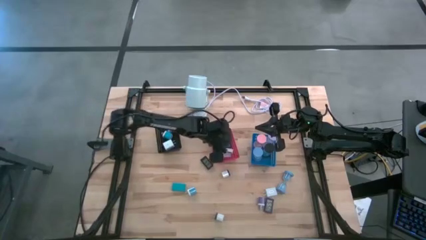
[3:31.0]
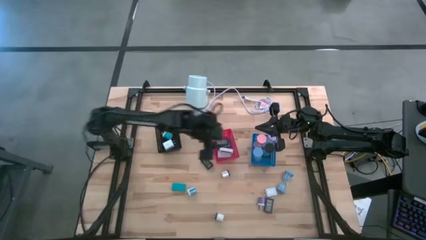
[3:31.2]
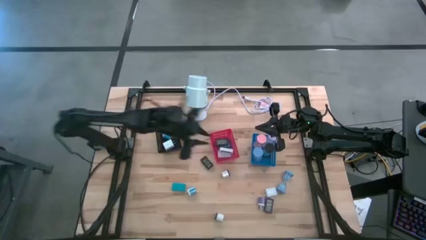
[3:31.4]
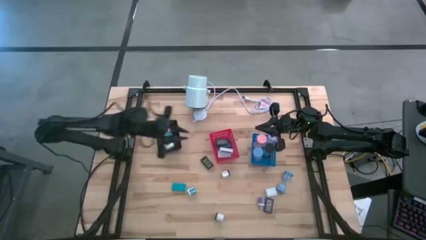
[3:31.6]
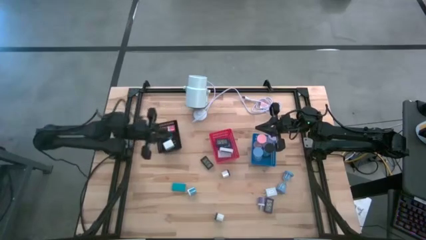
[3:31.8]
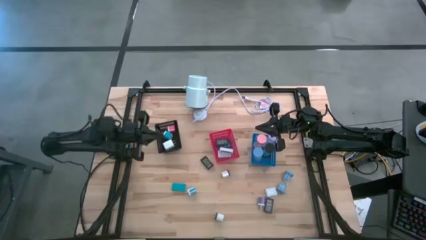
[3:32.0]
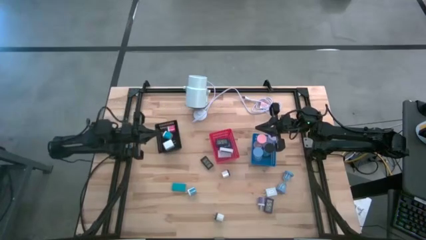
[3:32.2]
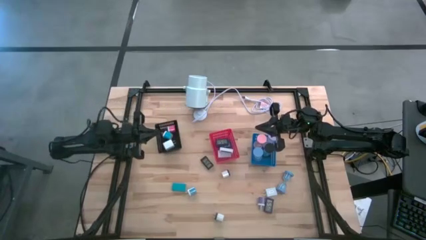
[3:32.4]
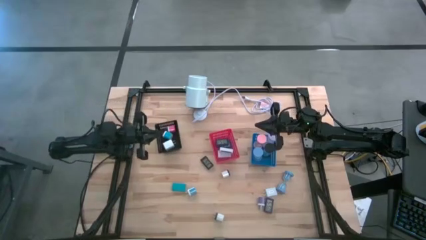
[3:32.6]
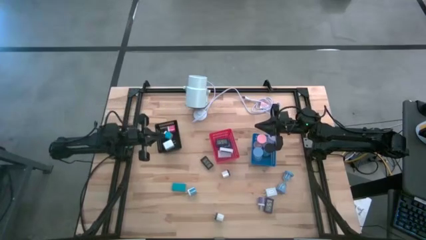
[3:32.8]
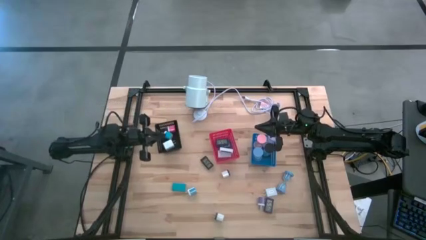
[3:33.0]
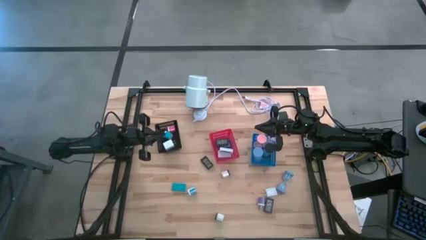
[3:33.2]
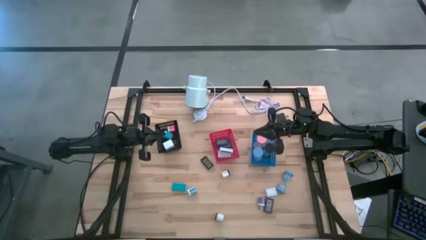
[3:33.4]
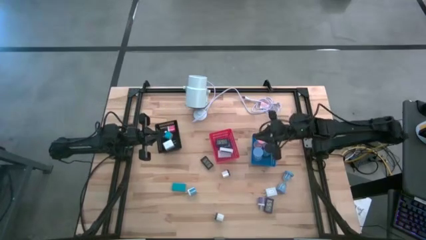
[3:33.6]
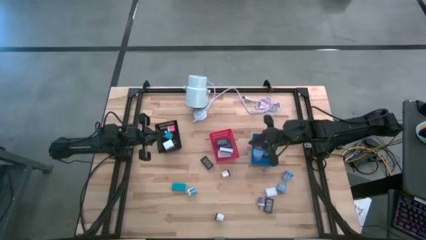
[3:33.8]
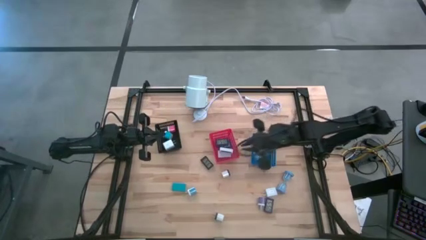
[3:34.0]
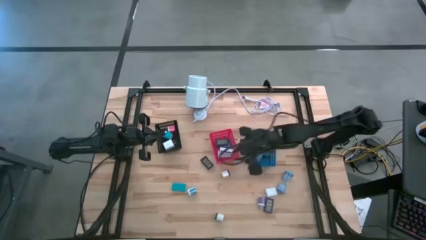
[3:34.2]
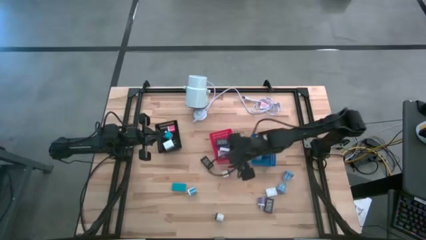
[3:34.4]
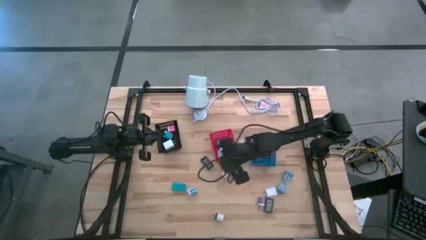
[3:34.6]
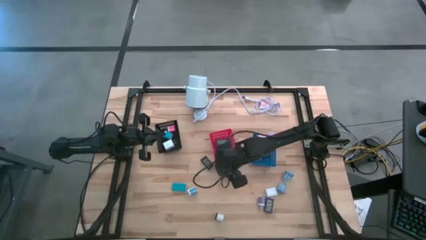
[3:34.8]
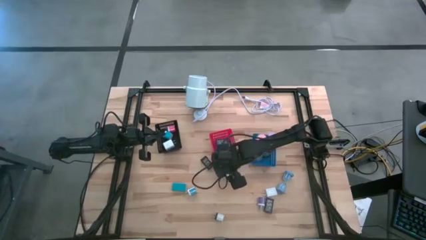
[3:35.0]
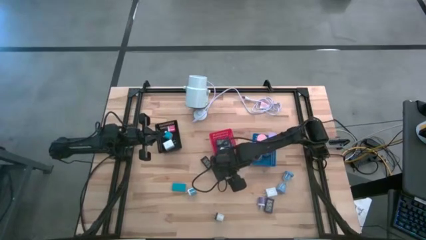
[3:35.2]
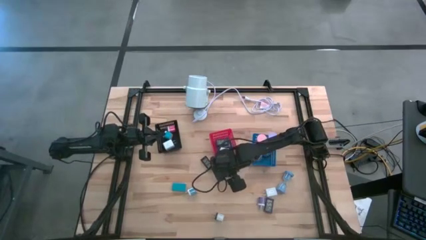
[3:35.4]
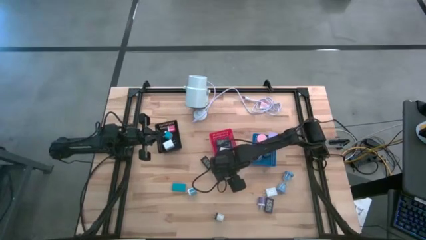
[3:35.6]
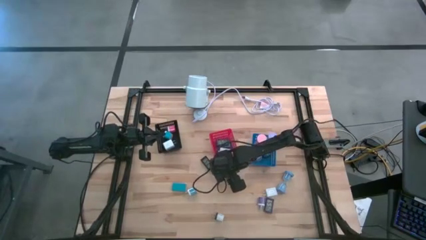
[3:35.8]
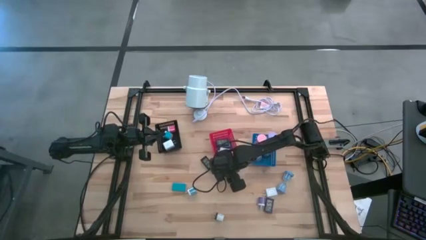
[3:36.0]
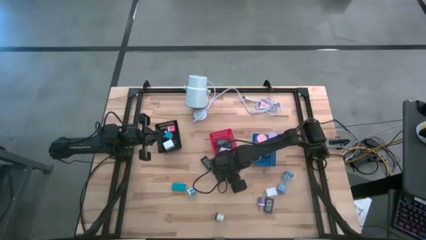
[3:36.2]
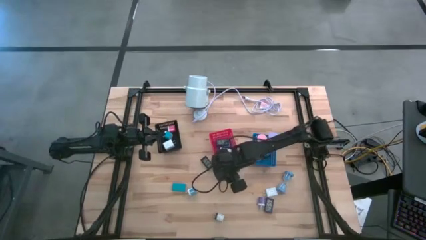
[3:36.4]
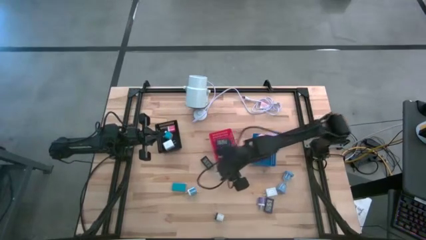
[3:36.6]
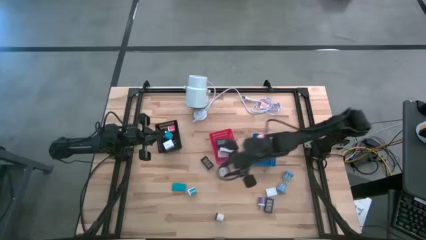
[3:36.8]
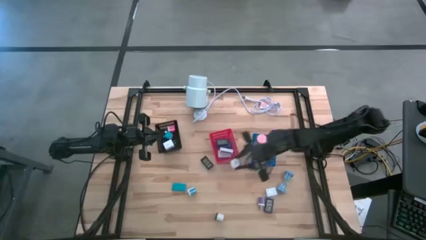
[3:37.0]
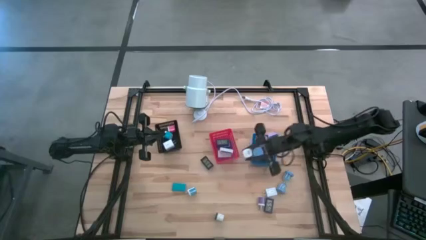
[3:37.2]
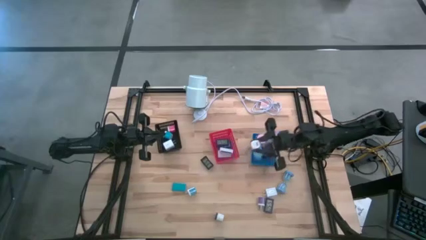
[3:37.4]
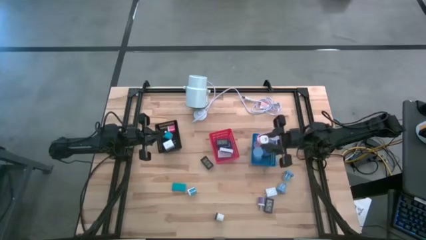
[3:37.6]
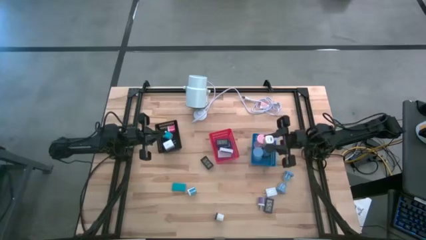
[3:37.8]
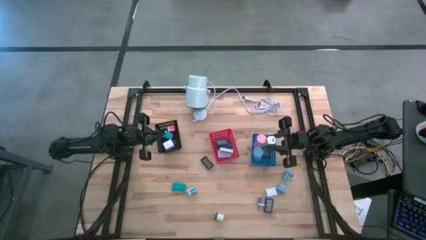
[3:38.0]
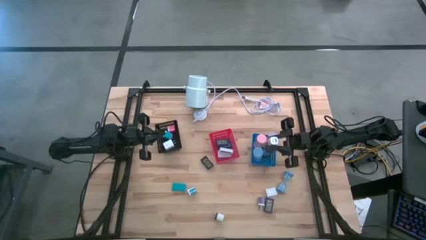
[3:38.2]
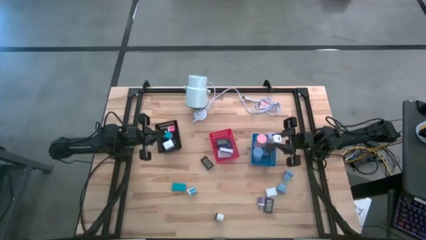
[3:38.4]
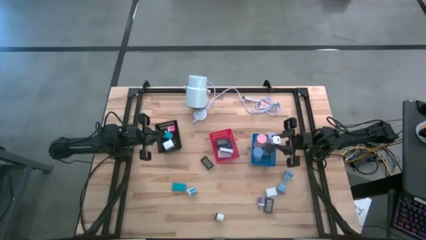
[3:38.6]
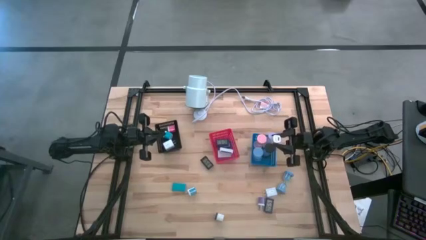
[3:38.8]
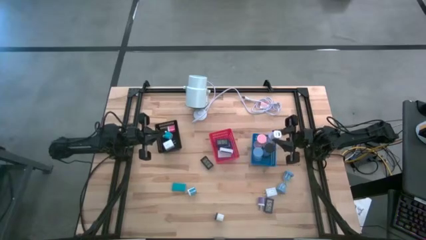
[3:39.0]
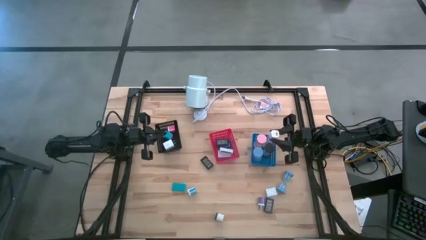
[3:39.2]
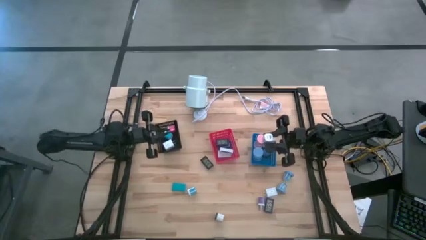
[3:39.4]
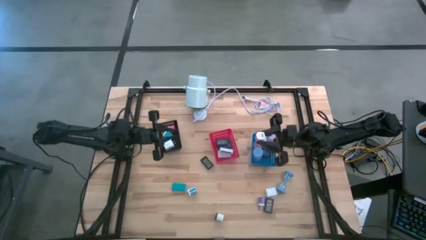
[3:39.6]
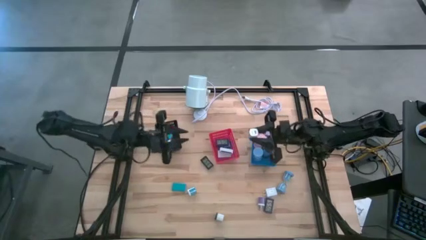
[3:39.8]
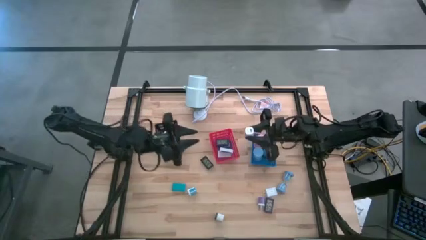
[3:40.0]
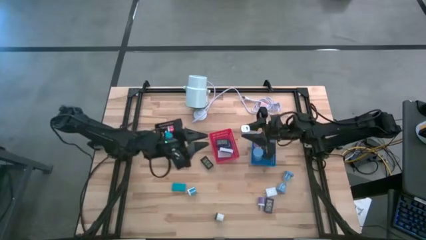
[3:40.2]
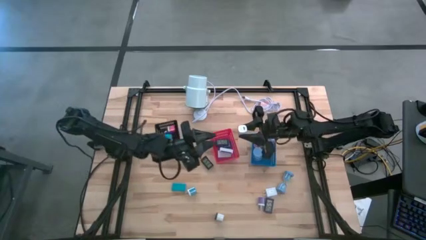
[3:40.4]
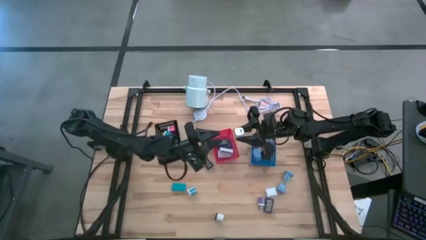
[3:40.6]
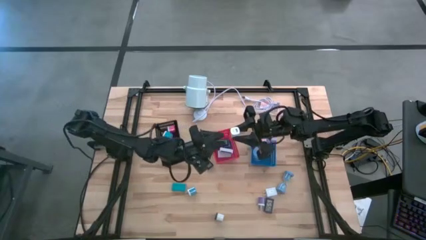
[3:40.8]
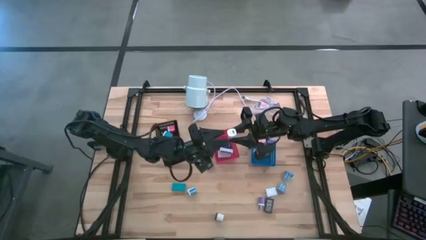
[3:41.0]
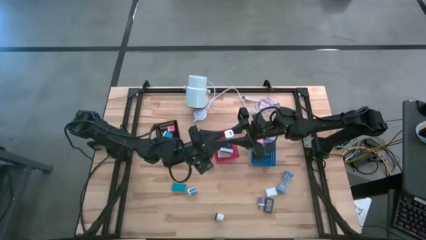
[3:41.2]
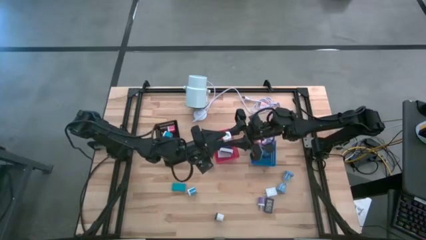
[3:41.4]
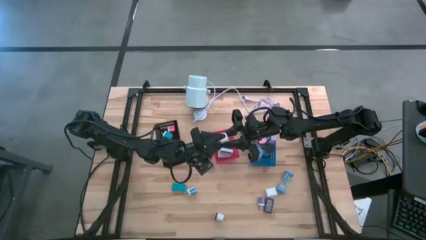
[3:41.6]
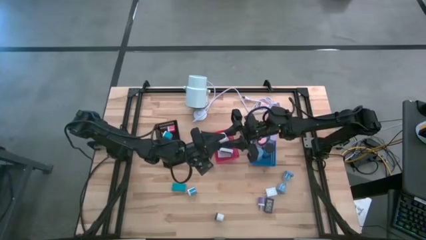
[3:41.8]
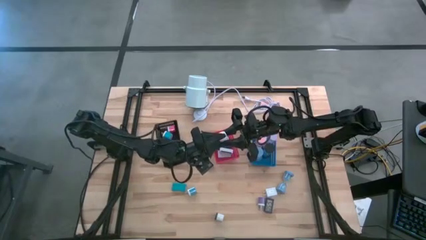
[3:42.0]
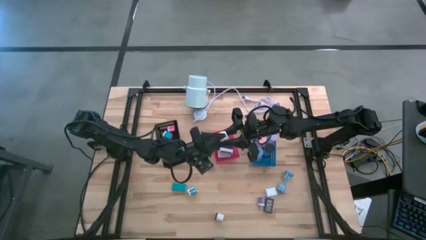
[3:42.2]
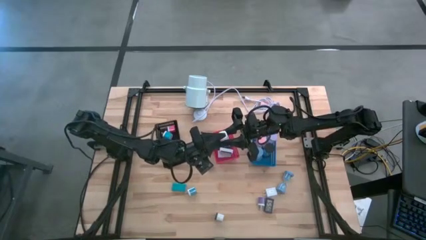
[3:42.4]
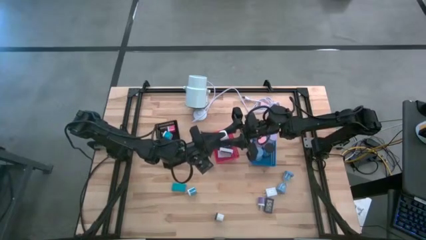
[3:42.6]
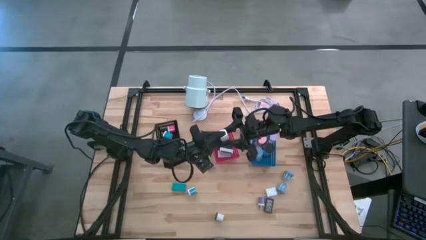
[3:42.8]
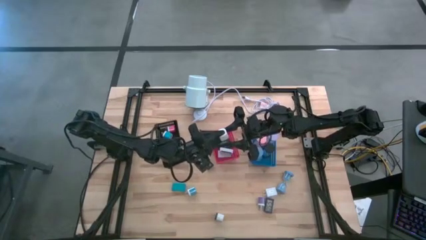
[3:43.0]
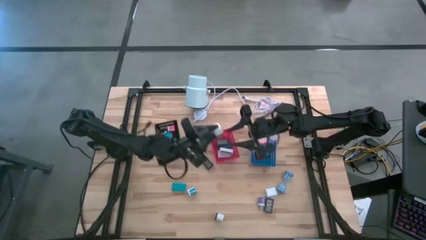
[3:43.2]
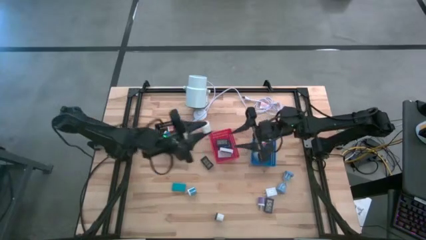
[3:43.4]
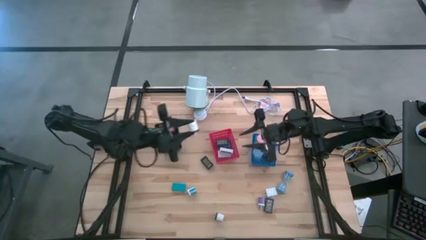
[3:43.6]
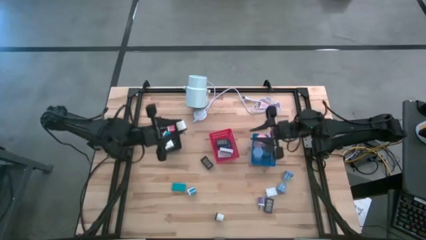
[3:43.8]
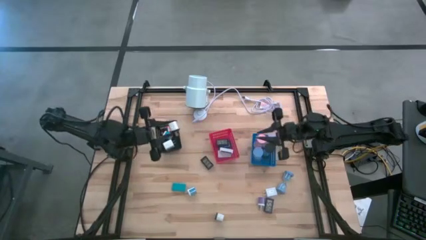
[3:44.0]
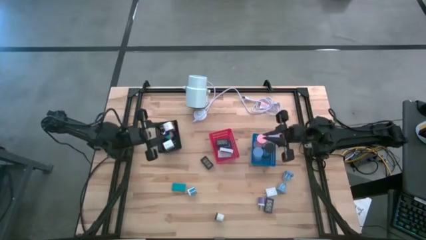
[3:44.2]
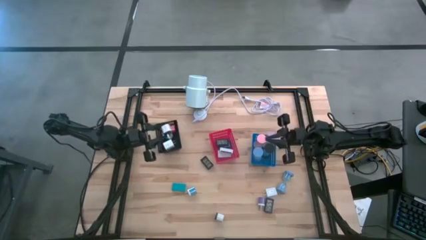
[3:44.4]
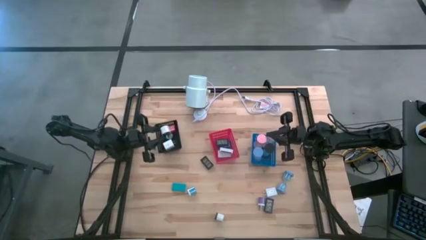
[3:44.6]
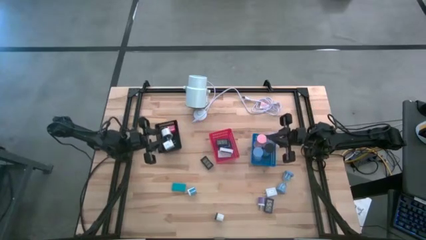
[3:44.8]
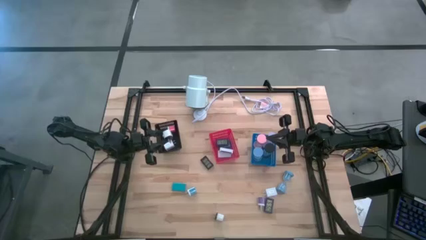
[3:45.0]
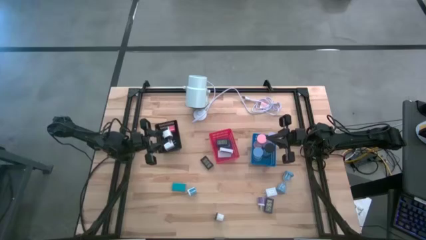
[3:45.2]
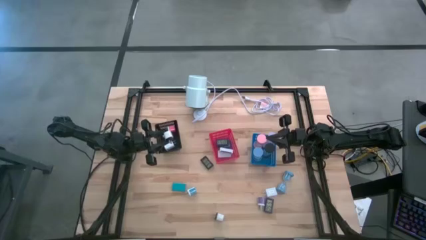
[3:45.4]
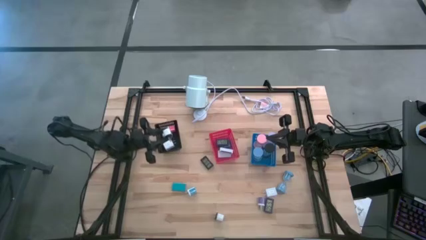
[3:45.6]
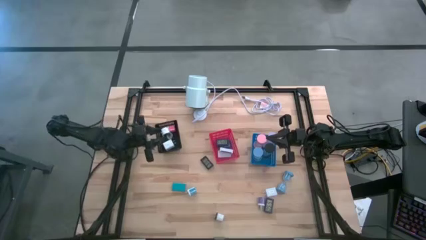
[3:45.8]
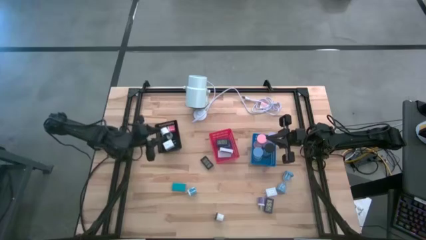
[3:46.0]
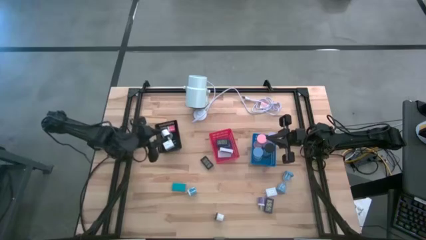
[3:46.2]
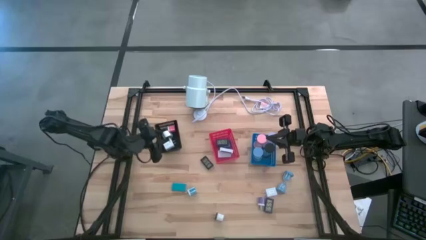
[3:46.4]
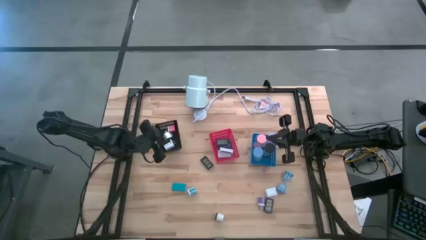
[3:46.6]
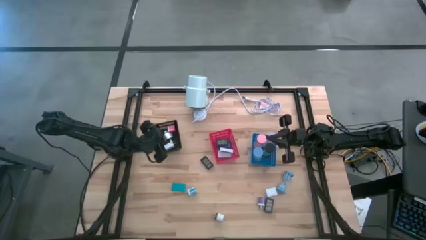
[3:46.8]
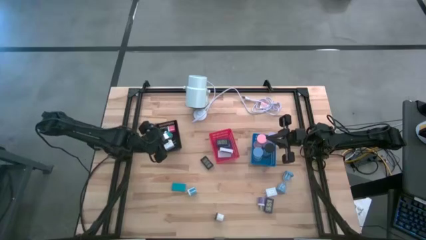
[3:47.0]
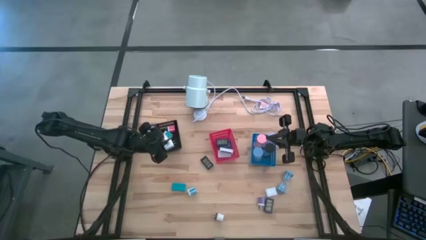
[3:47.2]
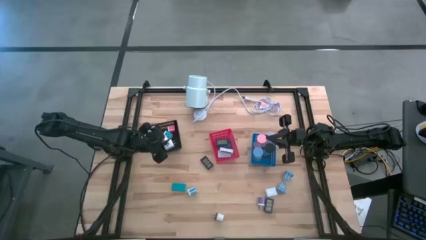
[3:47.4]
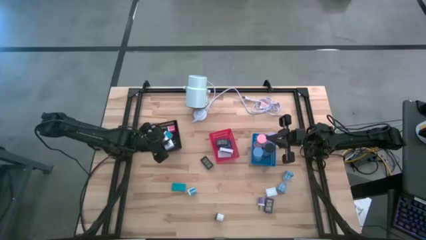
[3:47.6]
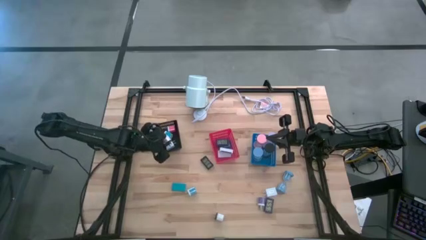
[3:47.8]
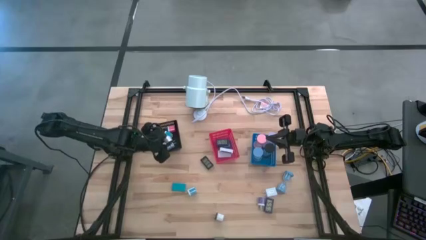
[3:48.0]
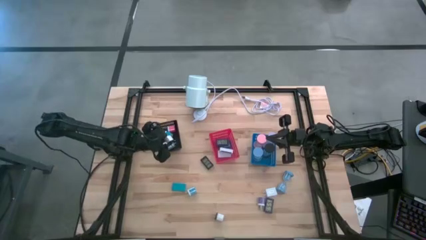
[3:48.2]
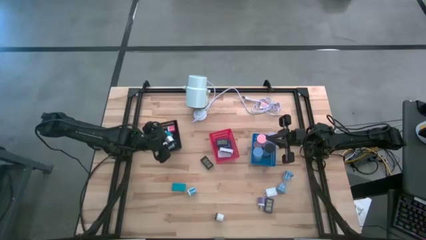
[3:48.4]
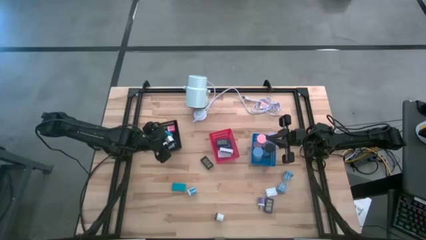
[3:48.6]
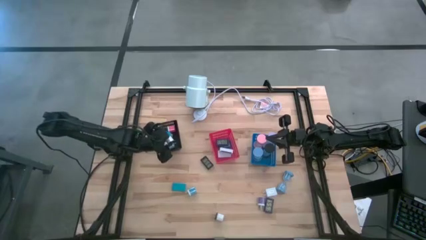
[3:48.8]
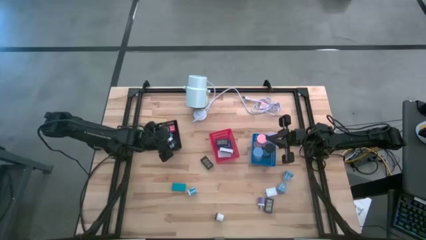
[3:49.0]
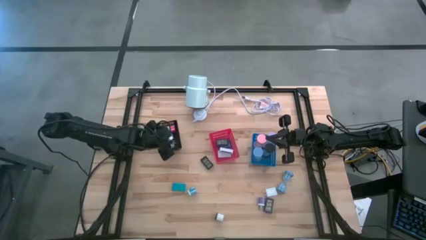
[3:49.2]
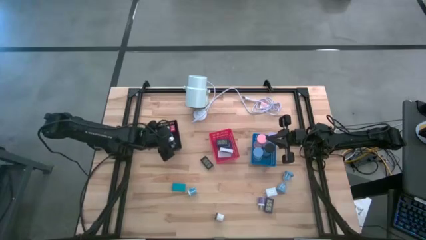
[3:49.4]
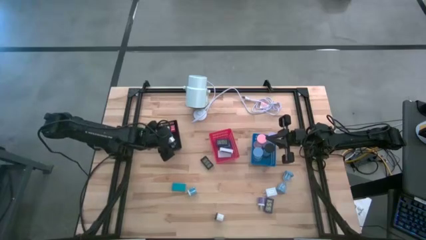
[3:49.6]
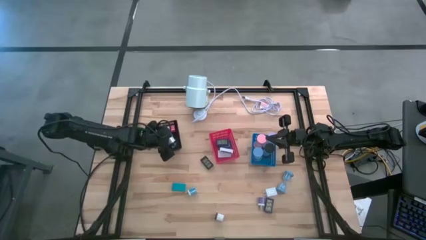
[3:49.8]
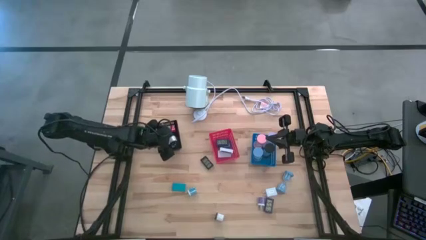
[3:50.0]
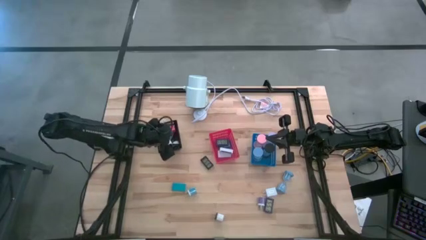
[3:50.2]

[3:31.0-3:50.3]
Task: Pick & Place Office items
Put the white charger adapter into the black bin
